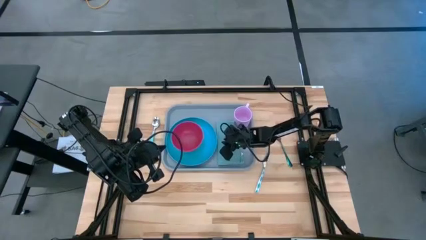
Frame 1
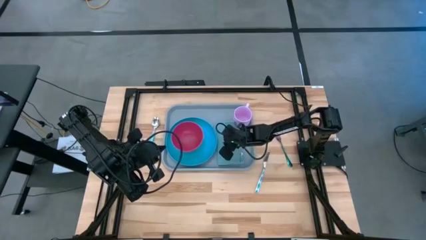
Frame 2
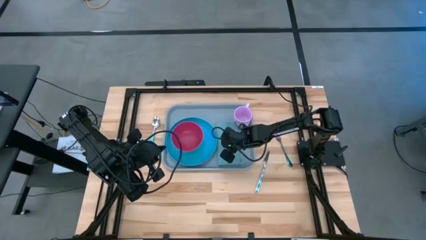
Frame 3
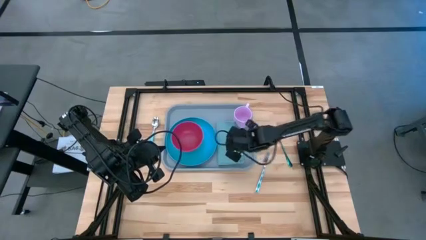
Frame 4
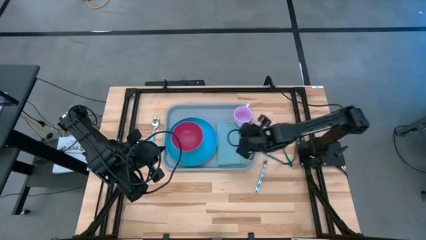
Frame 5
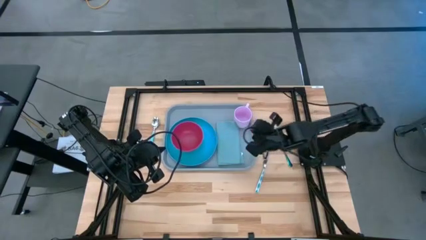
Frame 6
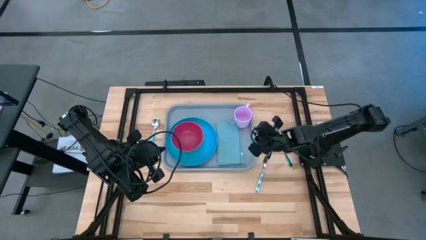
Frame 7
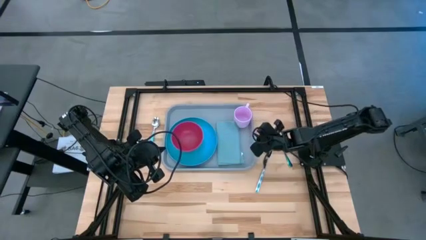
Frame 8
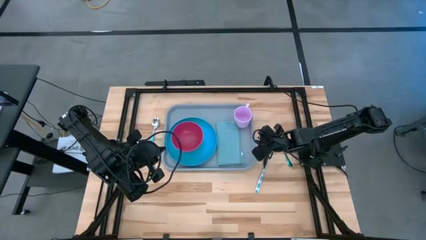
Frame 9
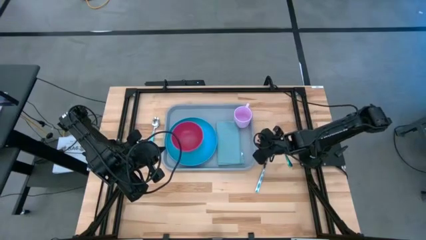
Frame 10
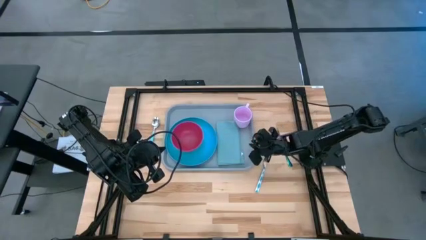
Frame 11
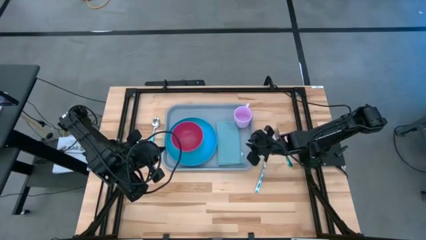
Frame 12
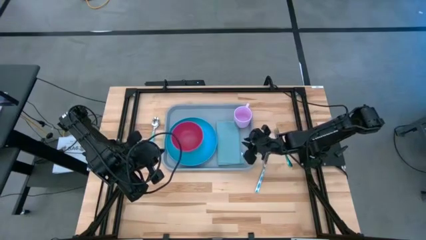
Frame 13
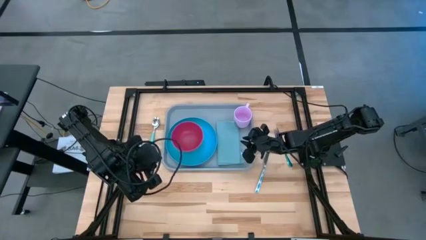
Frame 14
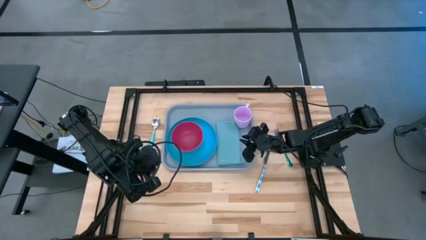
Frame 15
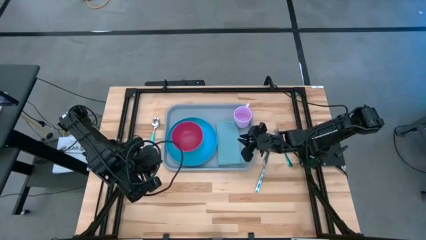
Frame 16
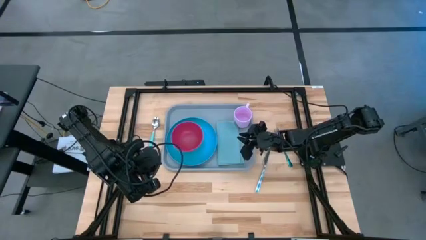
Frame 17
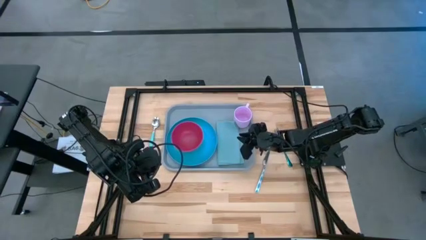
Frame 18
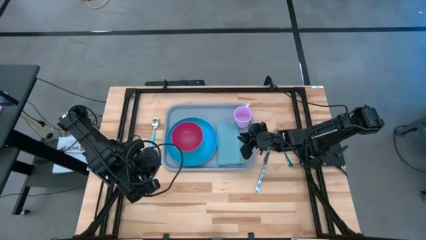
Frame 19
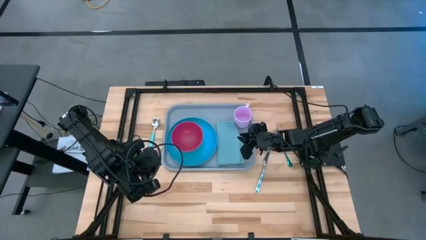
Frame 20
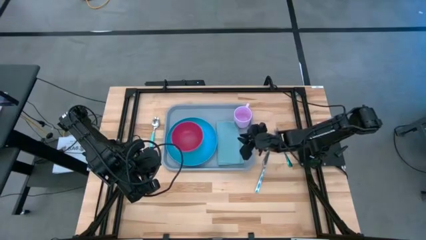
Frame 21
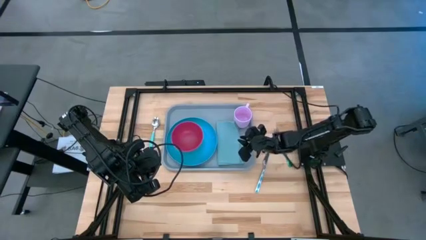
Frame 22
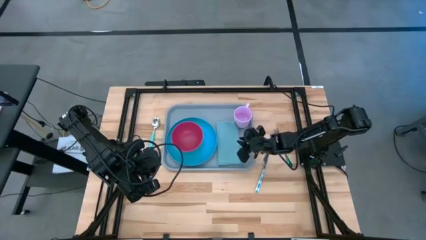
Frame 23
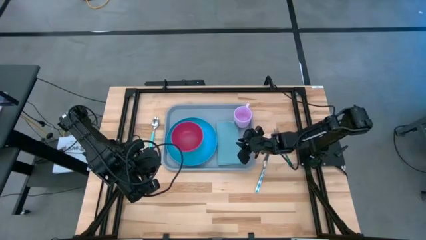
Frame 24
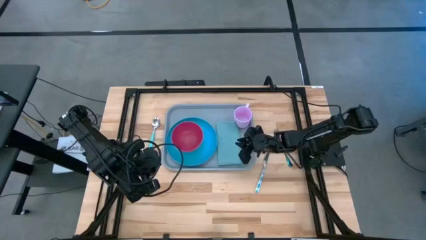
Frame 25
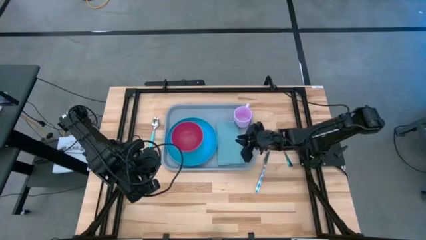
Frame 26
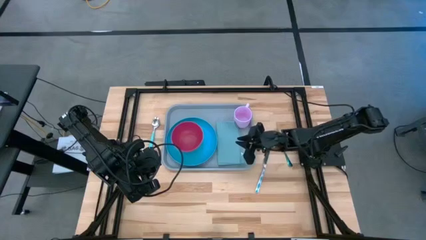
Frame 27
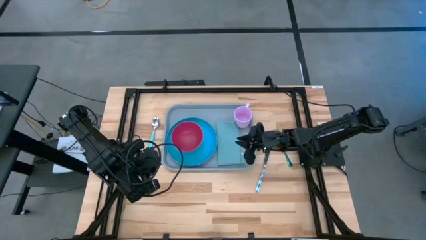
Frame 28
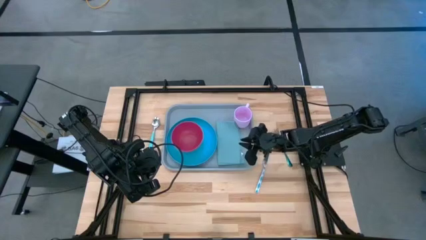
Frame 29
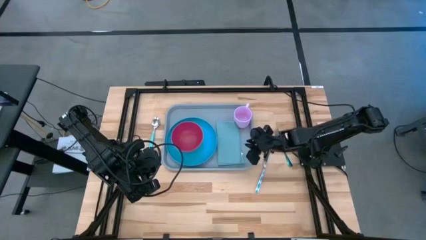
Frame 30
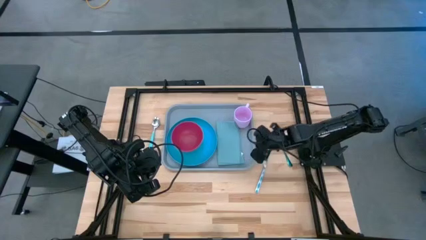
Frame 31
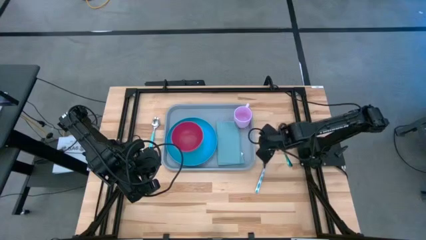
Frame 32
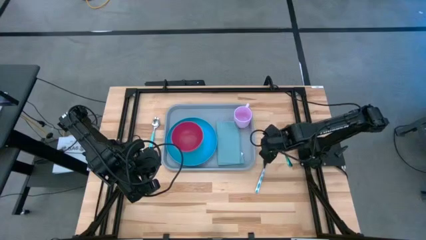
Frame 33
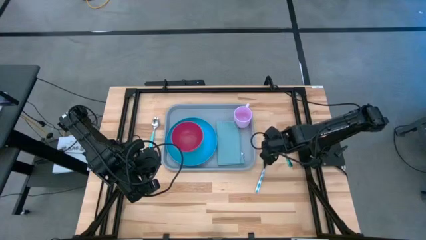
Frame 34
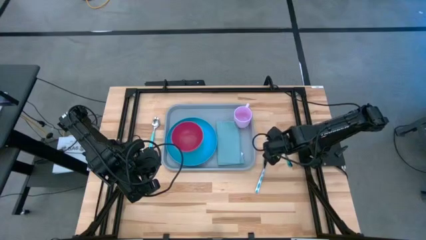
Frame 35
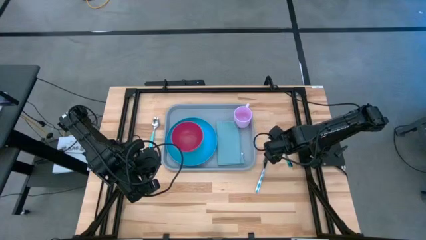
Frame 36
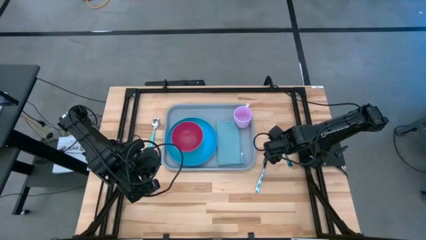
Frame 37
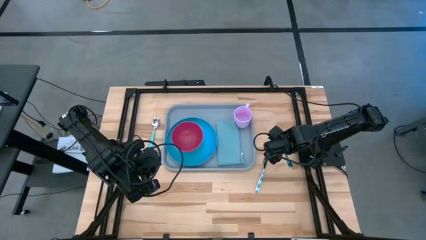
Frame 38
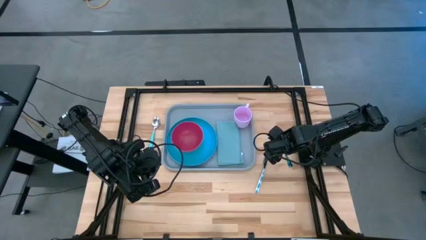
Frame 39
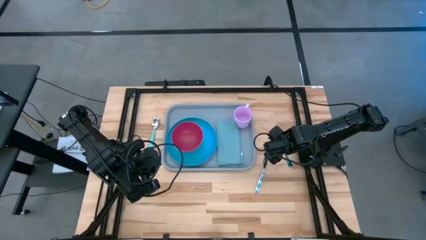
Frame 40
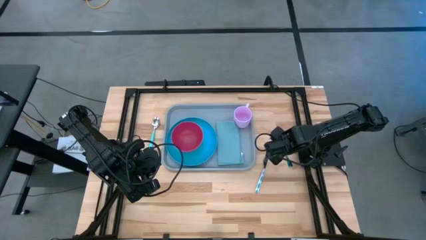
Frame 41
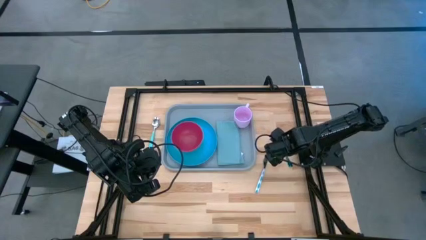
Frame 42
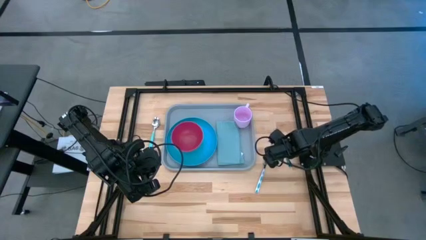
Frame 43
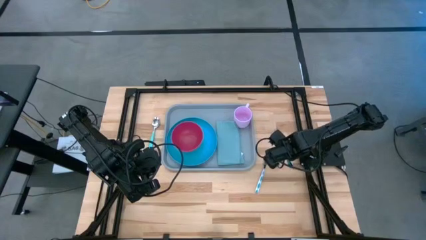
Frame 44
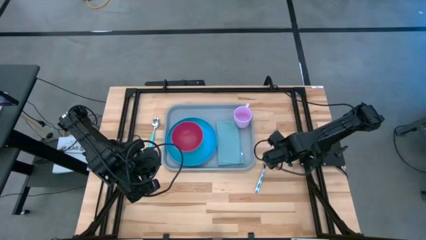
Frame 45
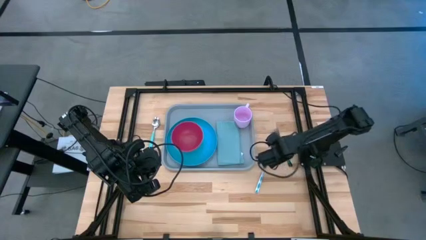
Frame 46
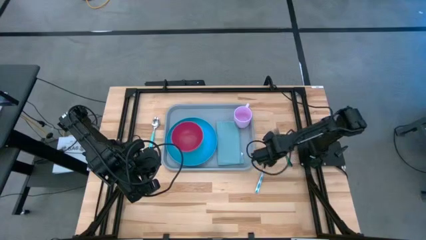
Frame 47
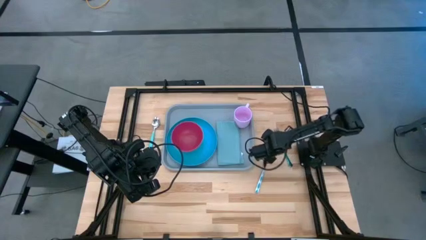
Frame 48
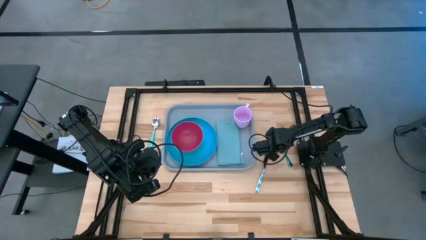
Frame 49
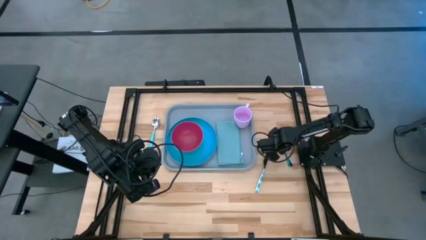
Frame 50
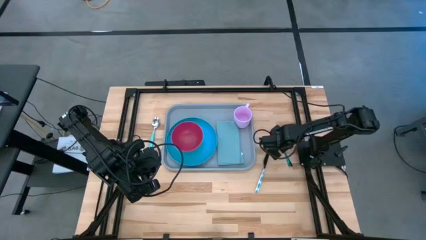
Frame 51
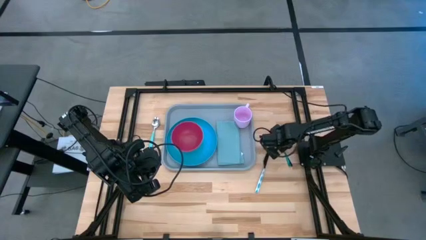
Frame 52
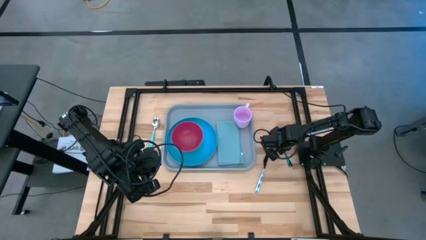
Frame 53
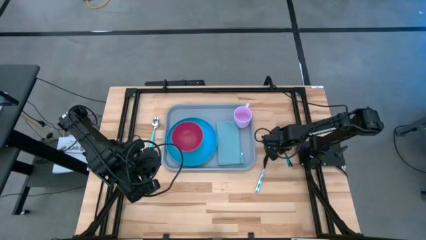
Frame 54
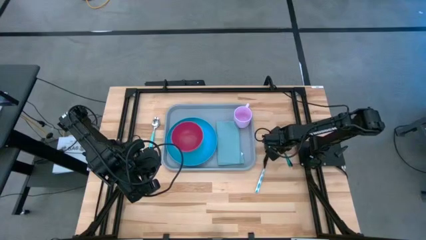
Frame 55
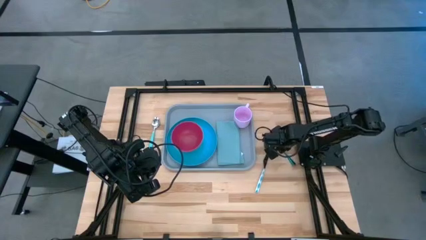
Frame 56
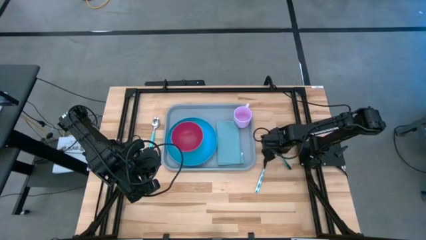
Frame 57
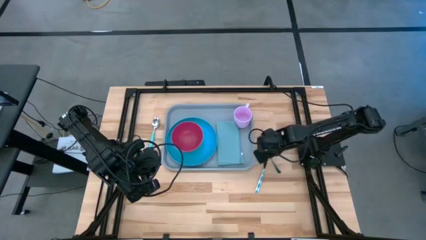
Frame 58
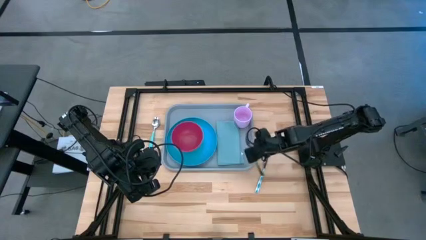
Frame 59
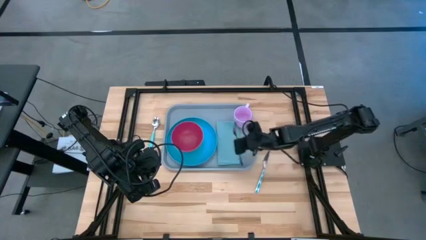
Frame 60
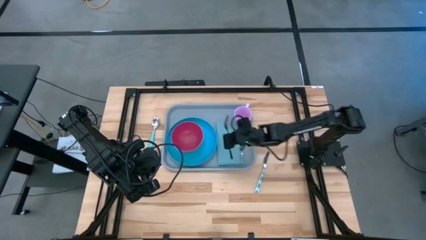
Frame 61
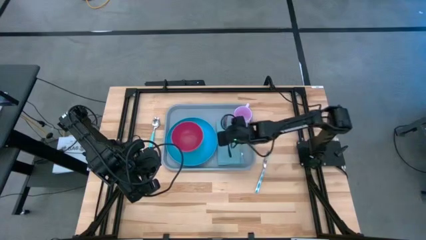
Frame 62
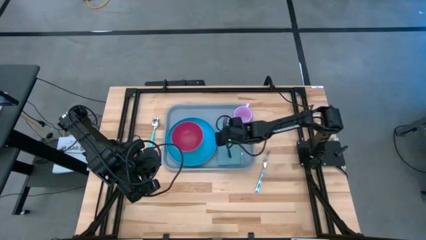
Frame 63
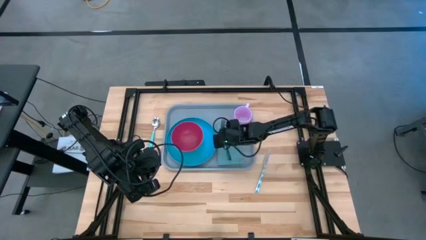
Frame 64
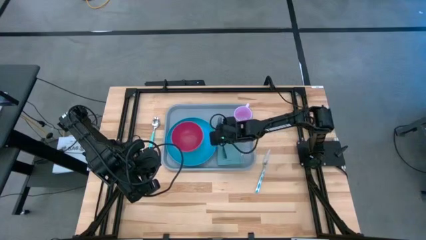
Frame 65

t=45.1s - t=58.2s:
Task: Set up tray
Put the purple fork on the blue napkin

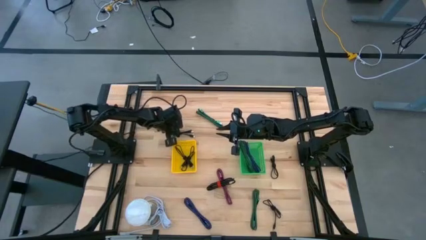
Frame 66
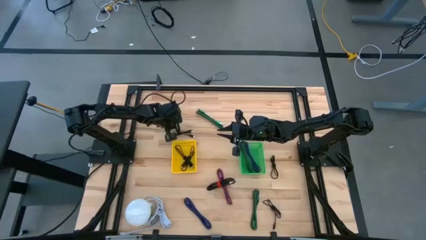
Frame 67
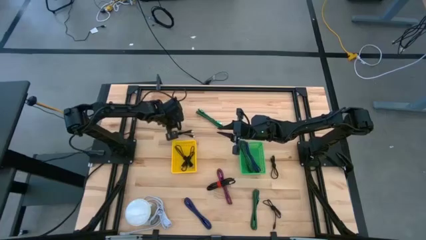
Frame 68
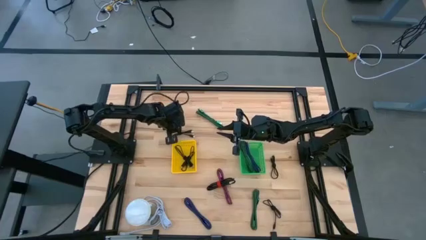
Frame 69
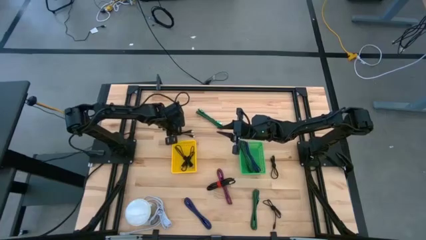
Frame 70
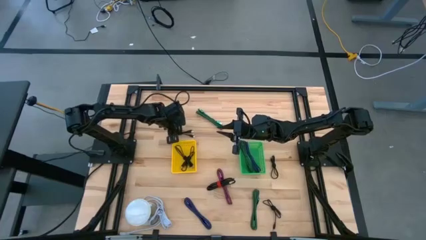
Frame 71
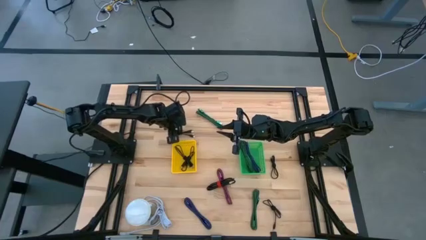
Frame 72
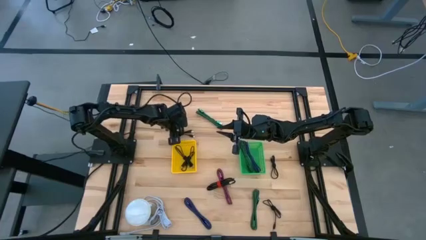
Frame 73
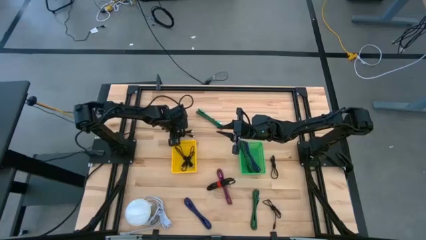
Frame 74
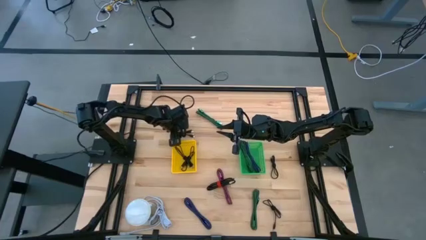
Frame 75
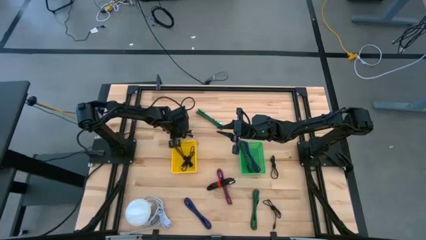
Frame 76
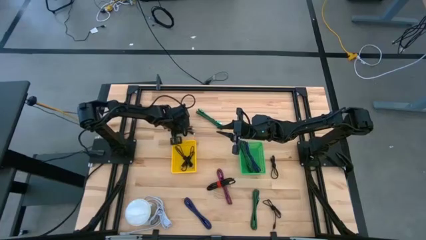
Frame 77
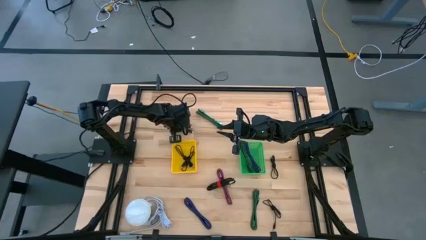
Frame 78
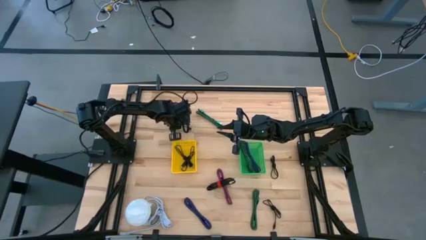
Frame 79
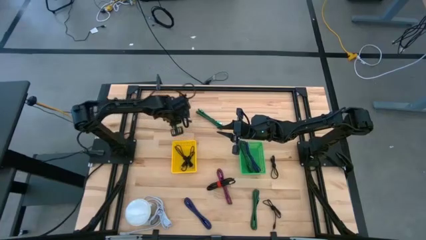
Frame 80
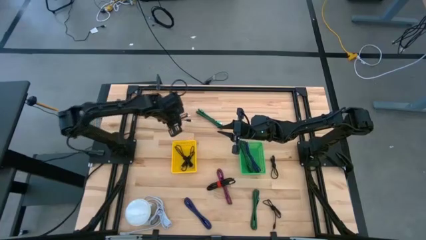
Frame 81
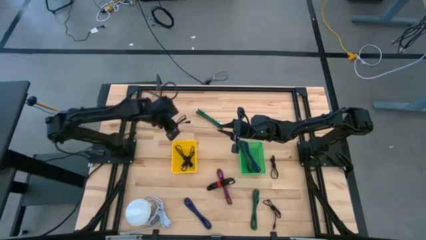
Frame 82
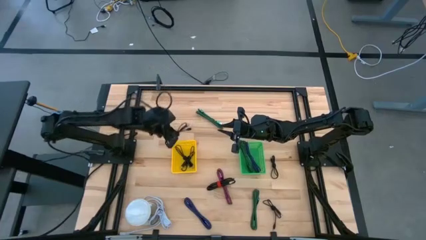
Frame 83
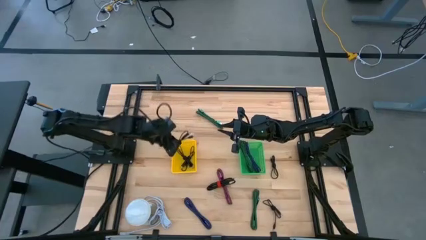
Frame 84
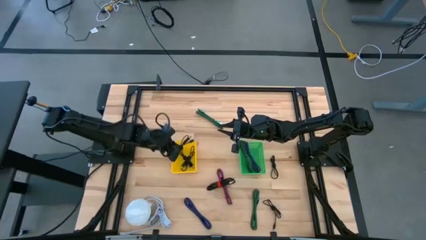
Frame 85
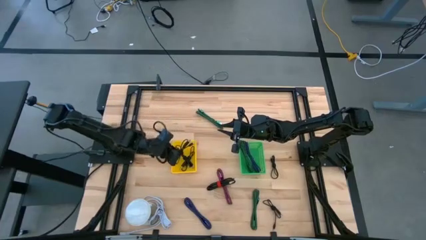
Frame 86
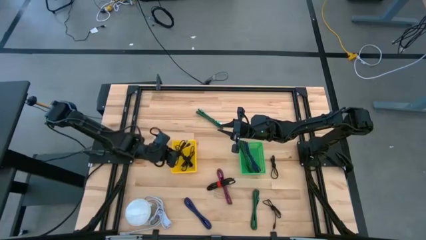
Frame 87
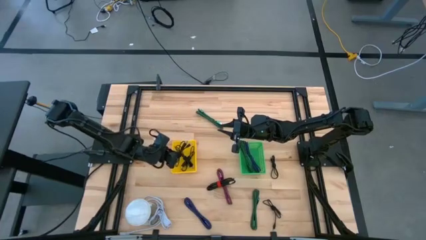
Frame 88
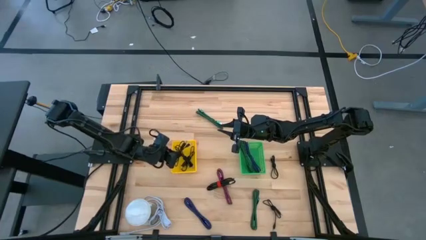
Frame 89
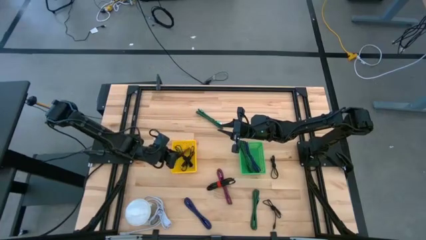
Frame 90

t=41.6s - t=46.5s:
Task: Pick & Place USB Port
Put the black charger cable into the yellow bin
